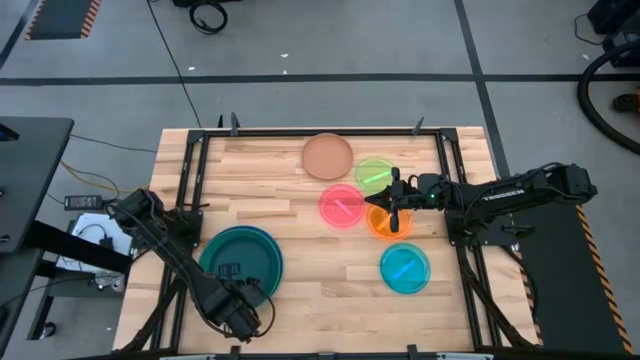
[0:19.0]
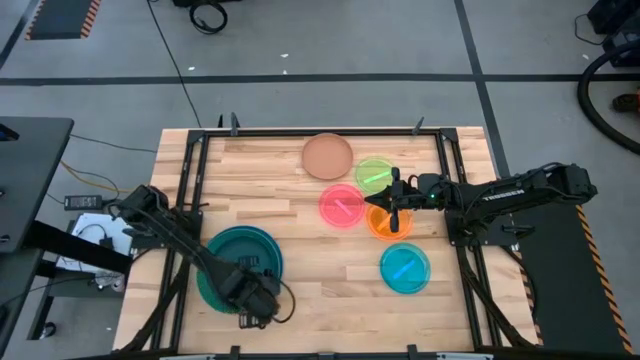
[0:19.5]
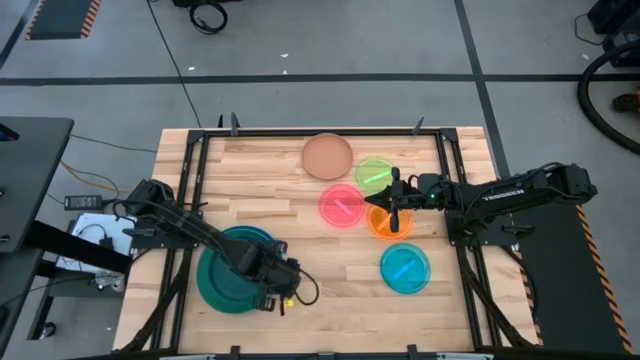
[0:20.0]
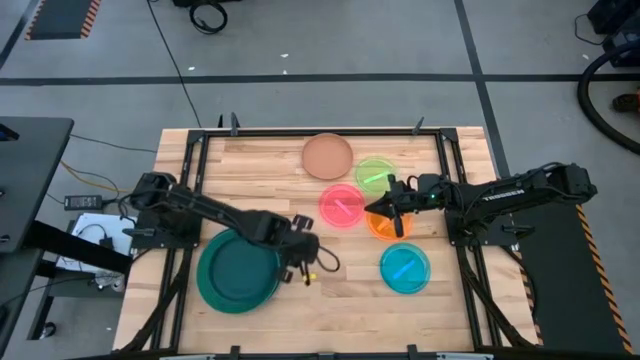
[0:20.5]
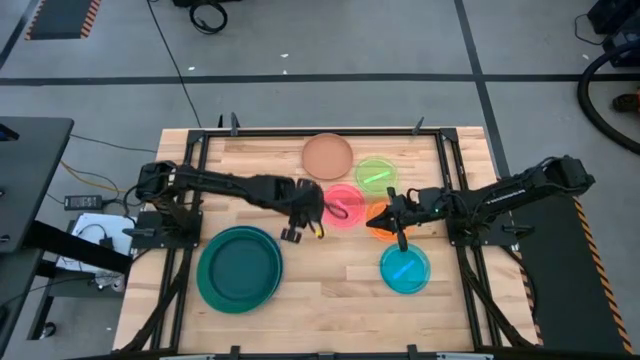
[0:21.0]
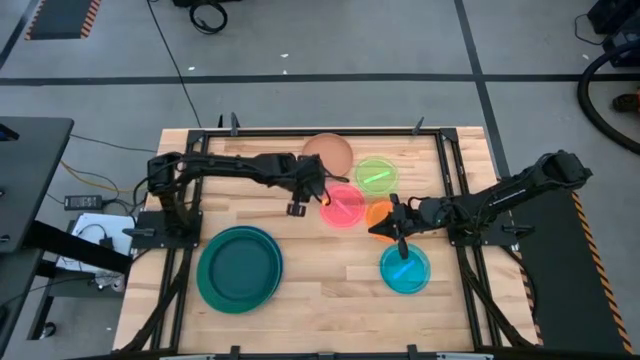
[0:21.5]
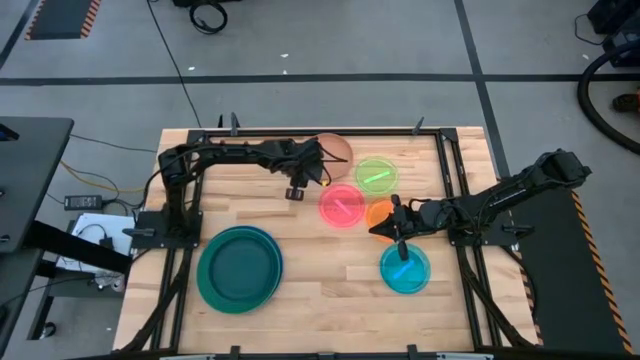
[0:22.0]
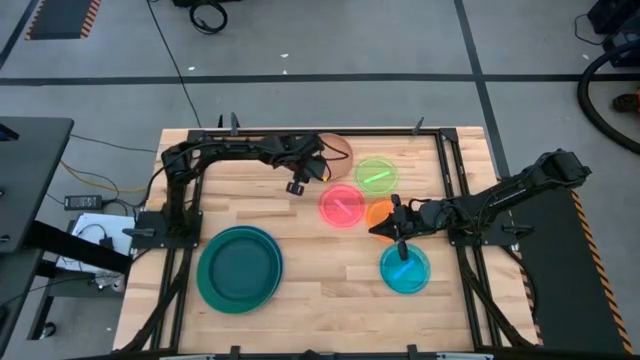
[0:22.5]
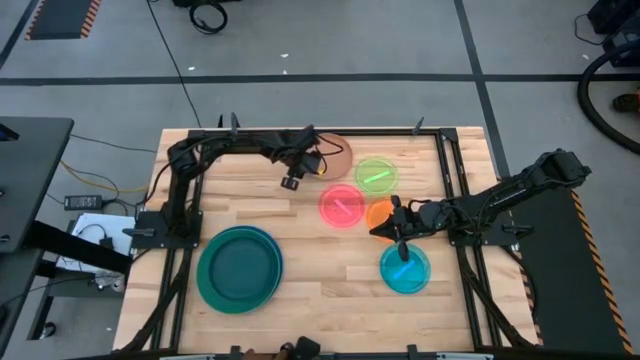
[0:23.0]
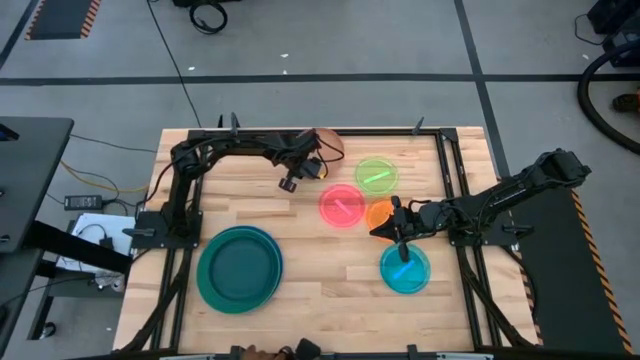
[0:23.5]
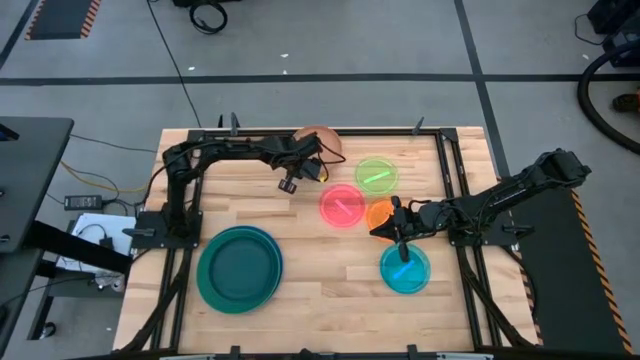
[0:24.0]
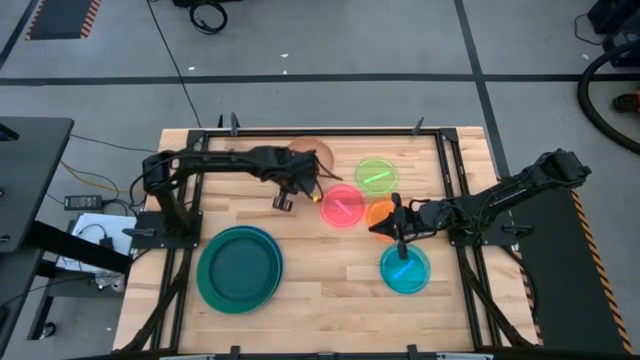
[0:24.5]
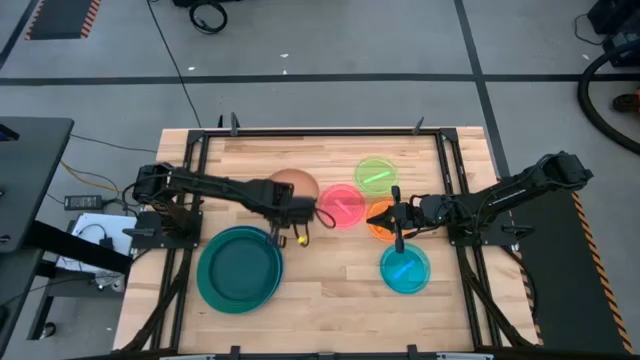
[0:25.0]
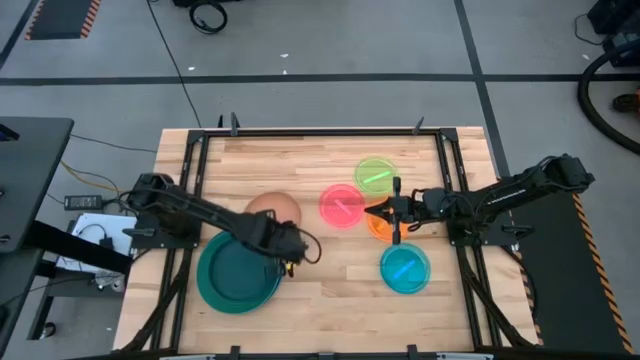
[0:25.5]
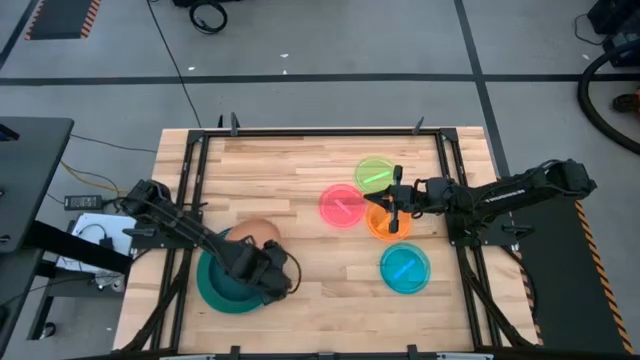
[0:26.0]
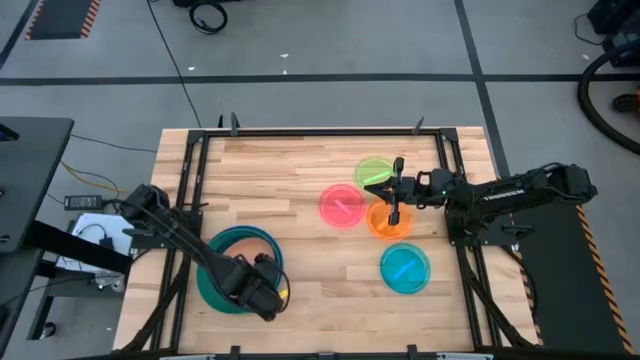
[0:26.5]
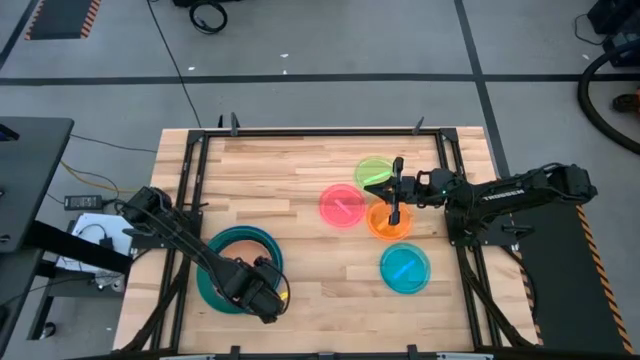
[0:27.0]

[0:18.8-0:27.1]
Task: Stack plastic plates
Stack the orange plate on top of the dark green plate

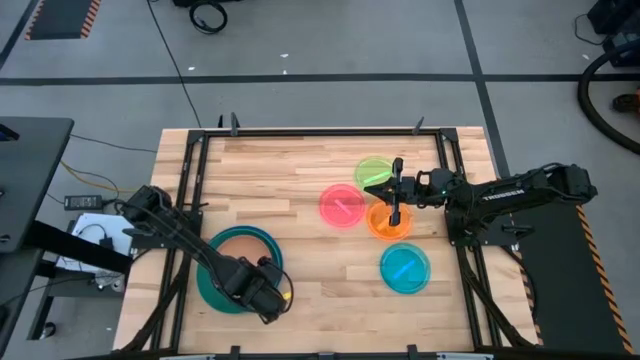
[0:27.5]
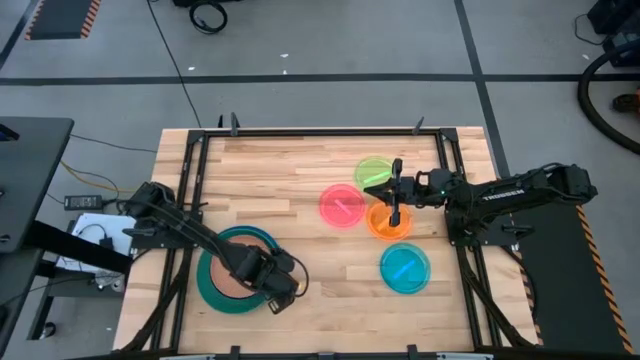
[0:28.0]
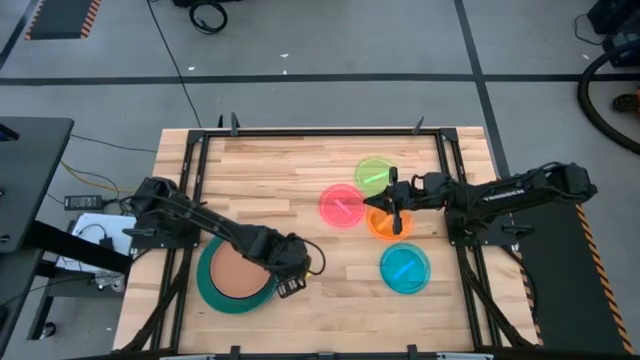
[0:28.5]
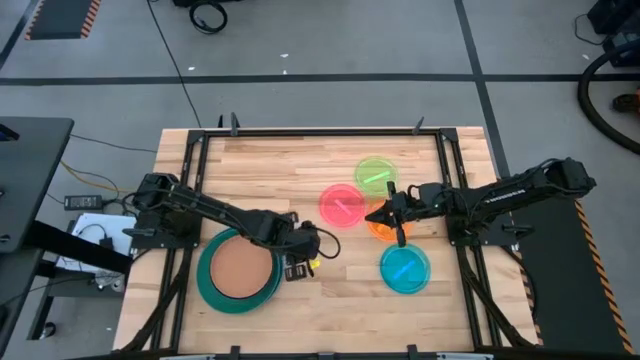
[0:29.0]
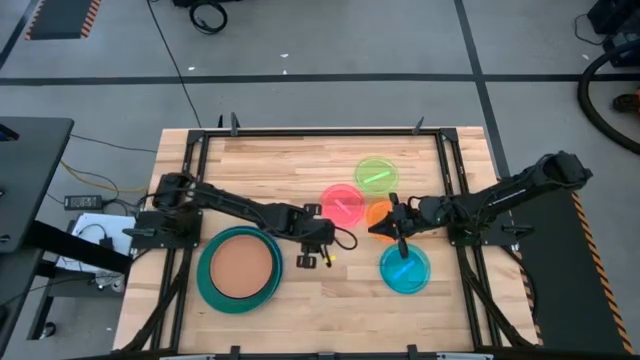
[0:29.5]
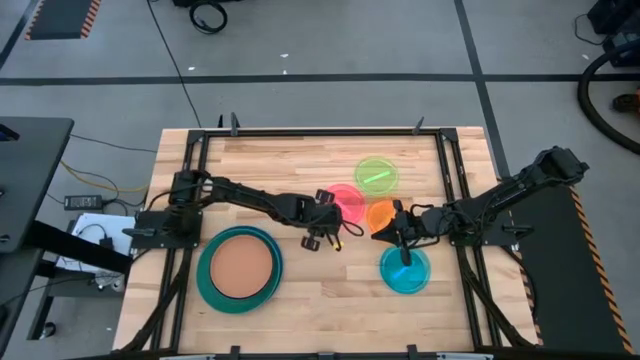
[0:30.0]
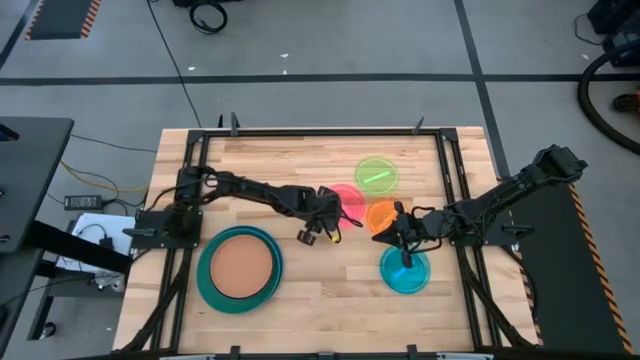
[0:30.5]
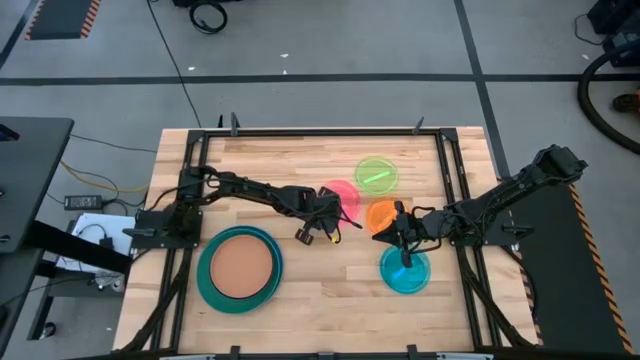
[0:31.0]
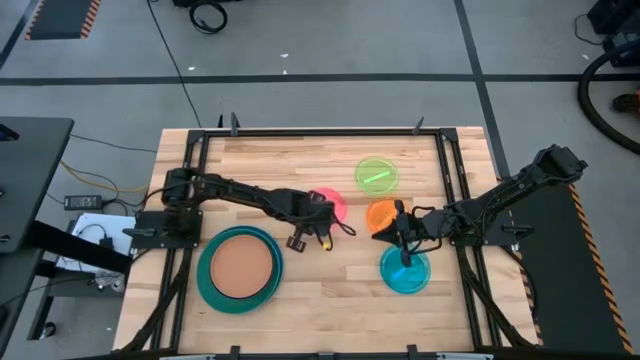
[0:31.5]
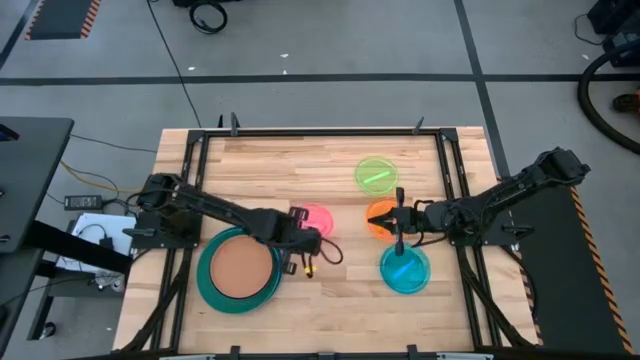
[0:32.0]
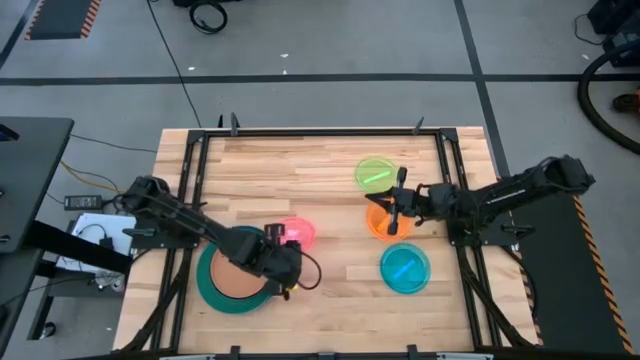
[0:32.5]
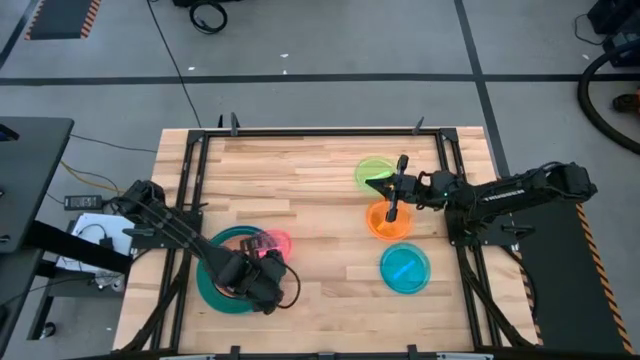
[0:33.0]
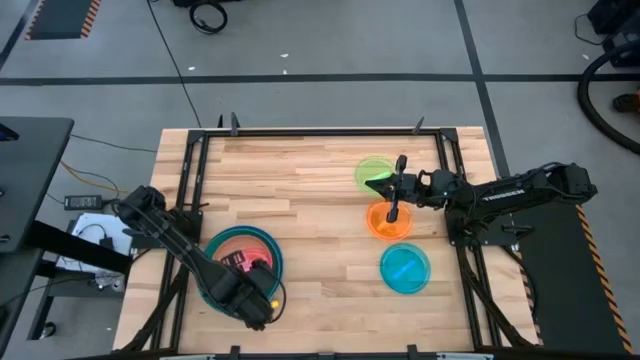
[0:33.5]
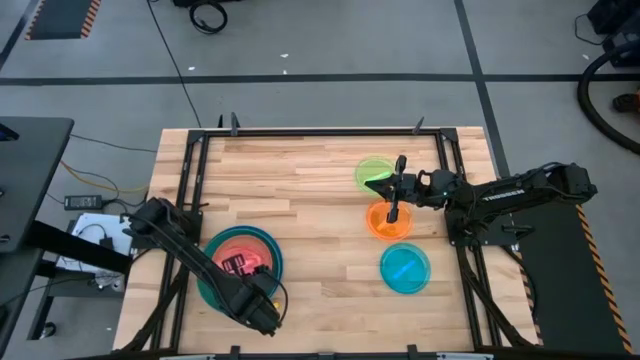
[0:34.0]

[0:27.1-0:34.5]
Stack the pink plate on top of the orange plate

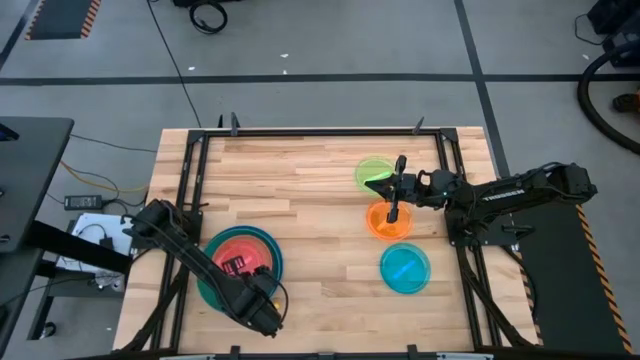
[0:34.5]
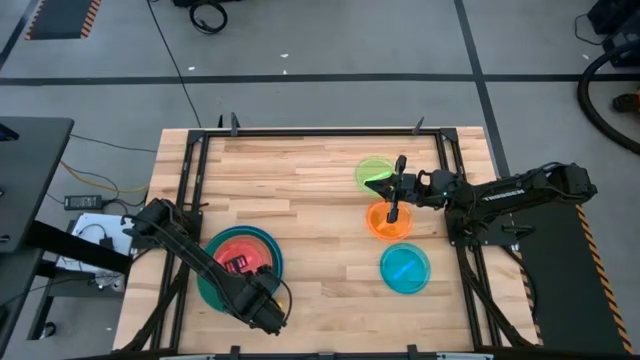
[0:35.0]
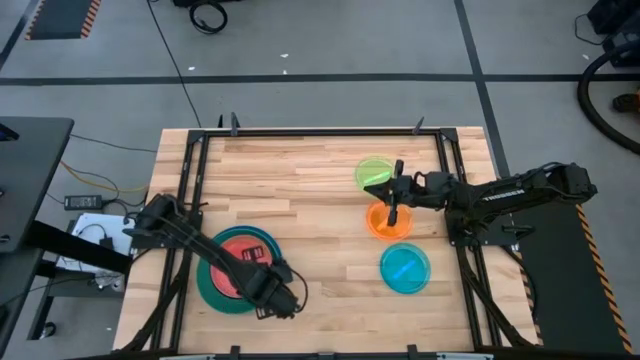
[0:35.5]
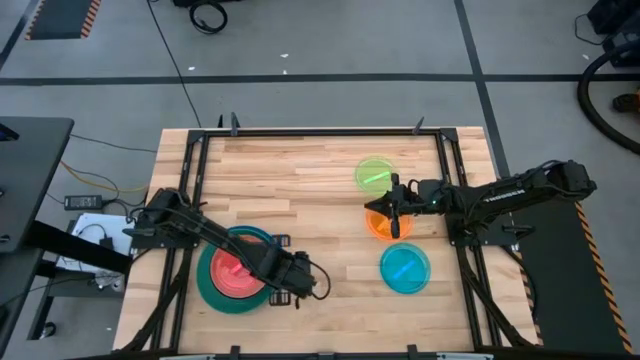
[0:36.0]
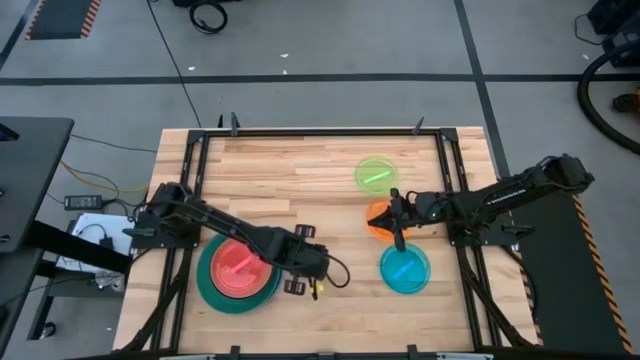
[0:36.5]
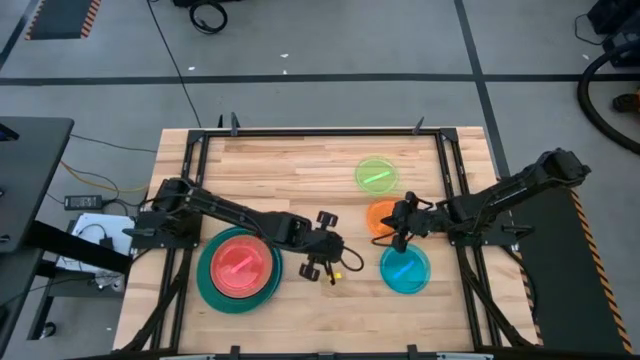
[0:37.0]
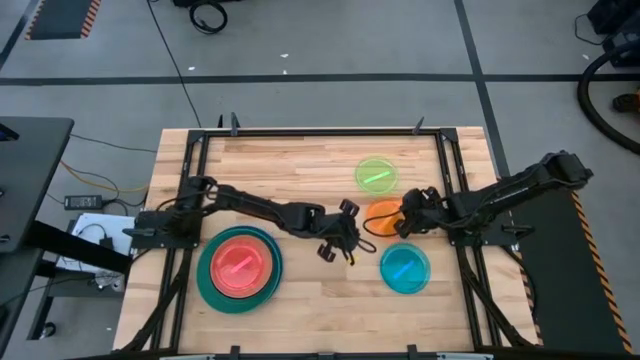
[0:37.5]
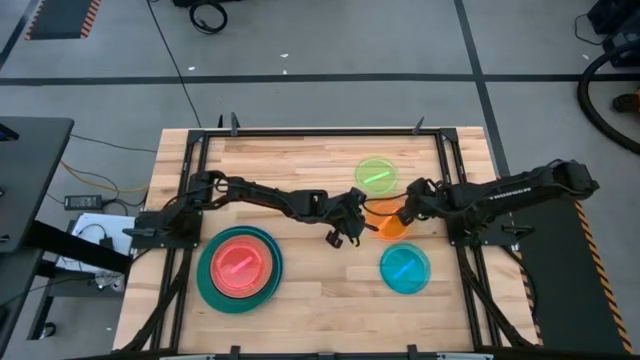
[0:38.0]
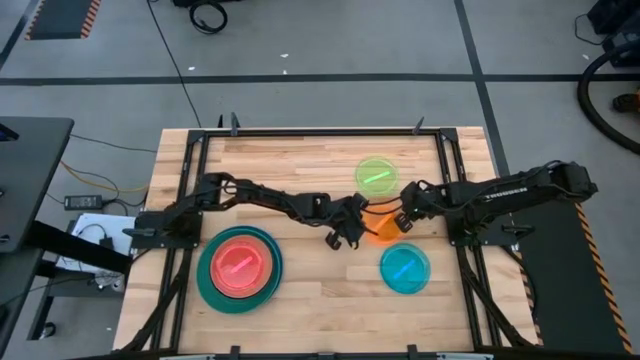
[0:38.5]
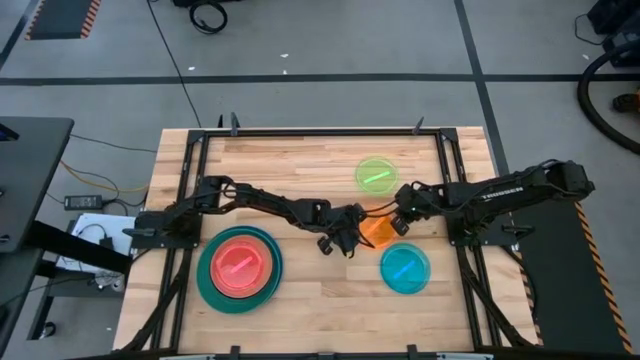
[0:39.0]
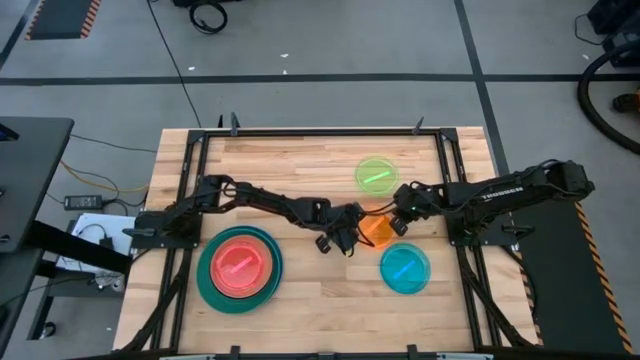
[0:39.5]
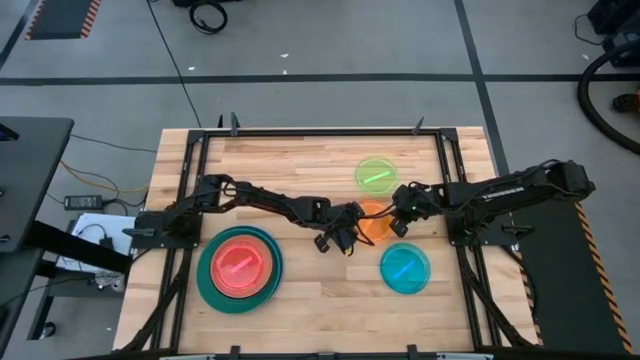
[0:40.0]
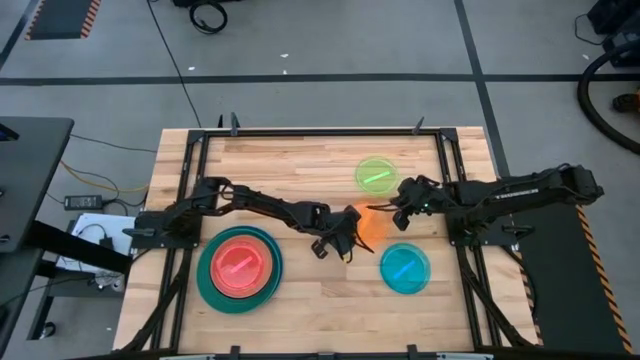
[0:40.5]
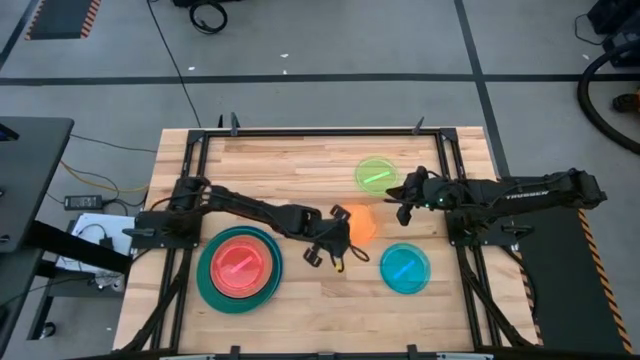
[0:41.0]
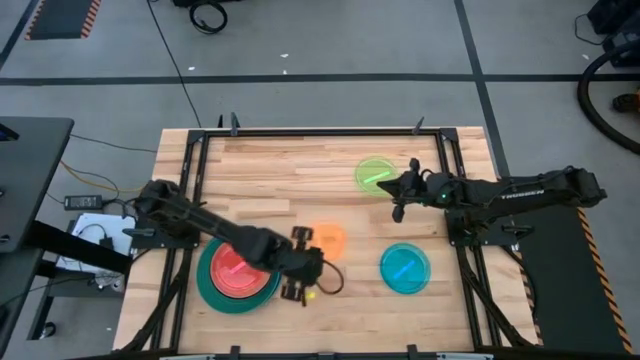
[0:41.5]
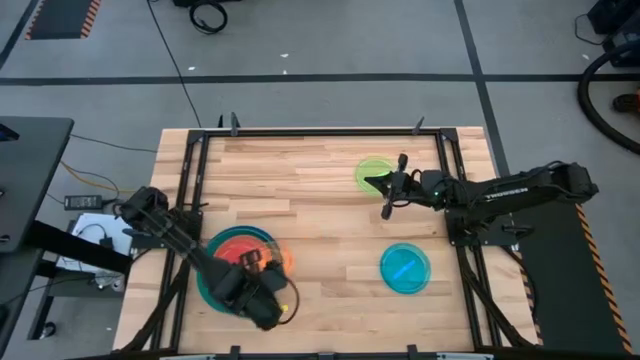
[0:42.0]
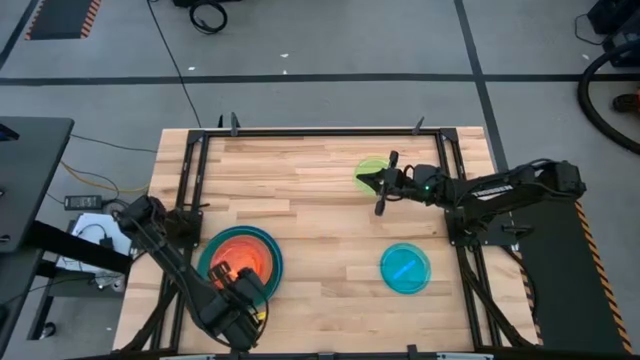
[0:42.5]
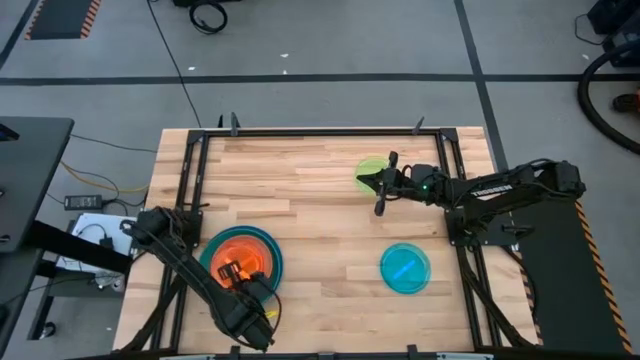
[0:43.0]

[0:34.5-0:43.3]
Stack the light orange plate on top of the pink plate
